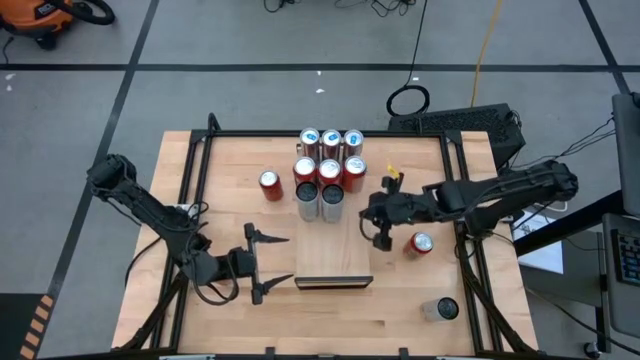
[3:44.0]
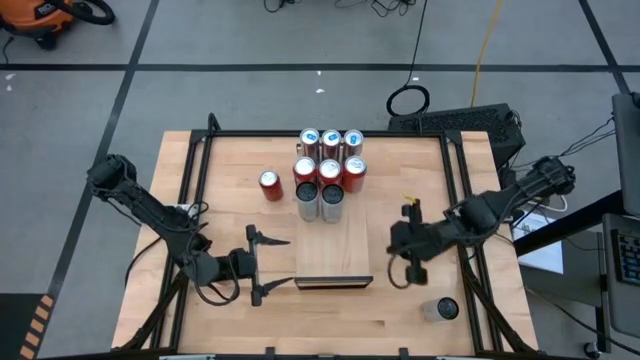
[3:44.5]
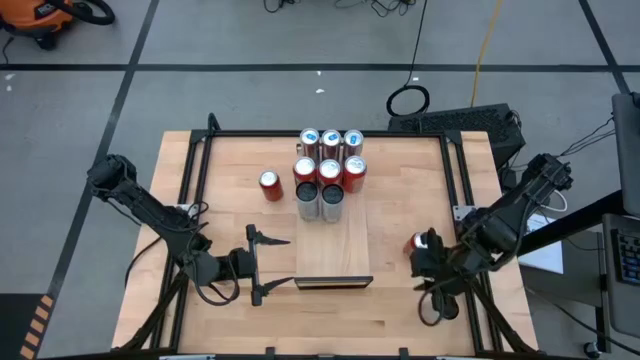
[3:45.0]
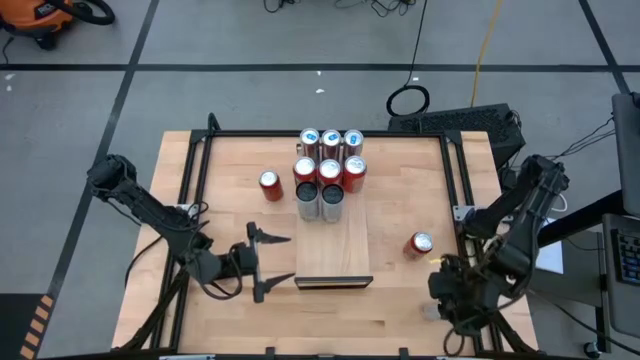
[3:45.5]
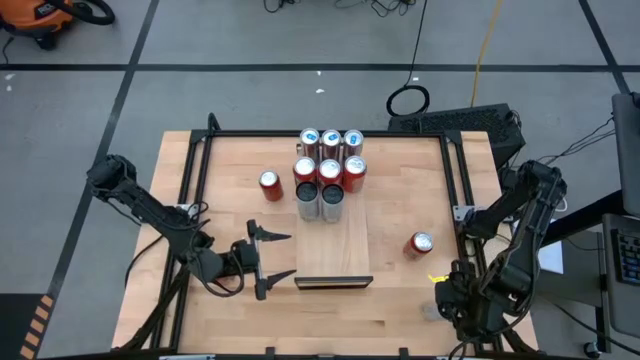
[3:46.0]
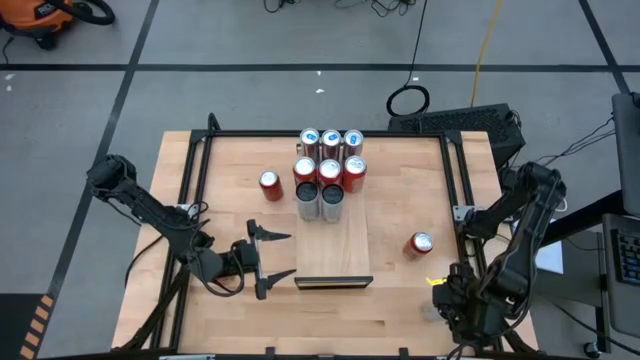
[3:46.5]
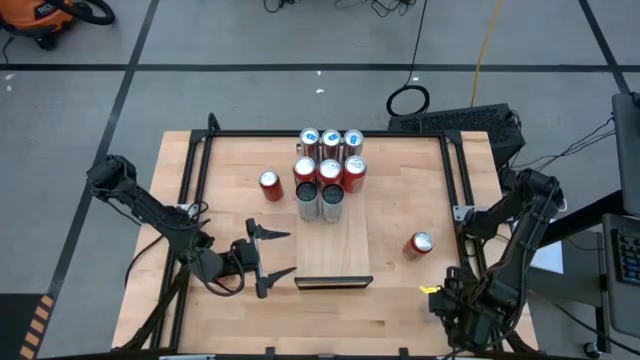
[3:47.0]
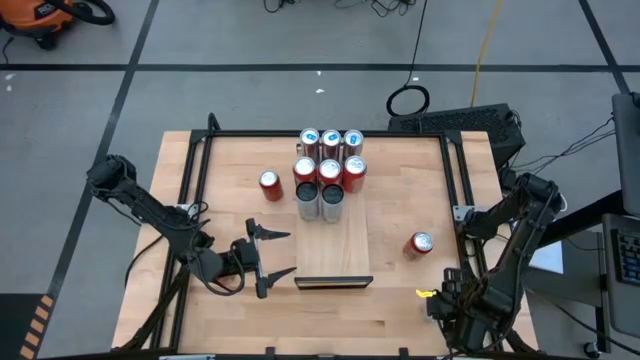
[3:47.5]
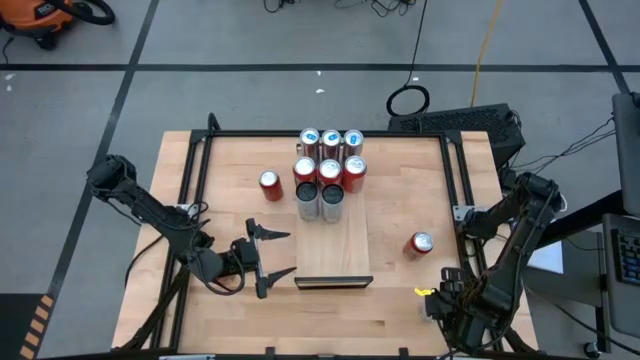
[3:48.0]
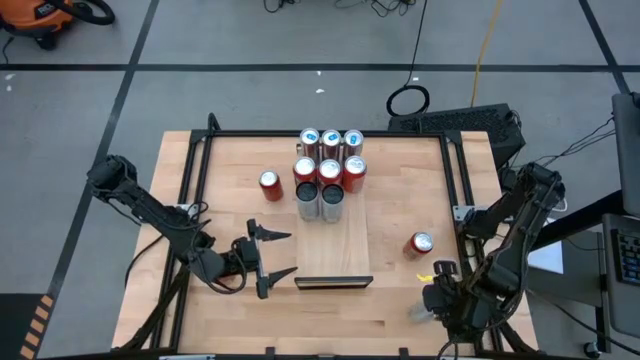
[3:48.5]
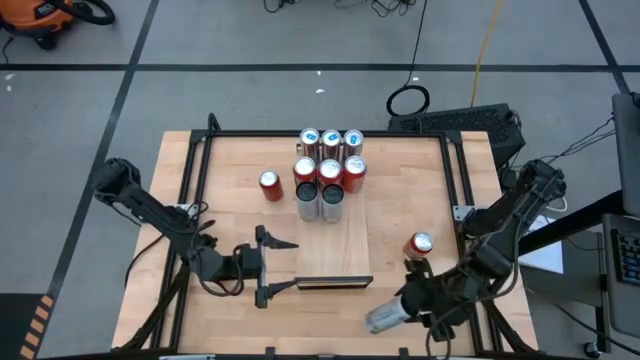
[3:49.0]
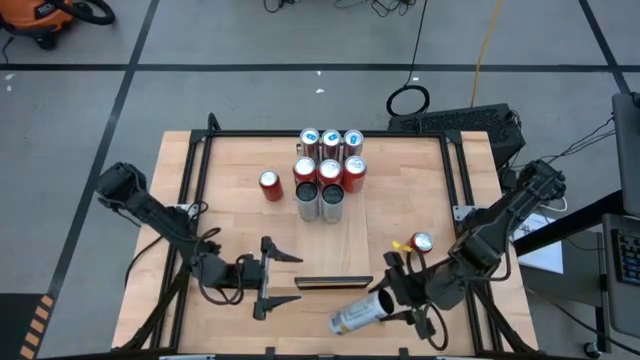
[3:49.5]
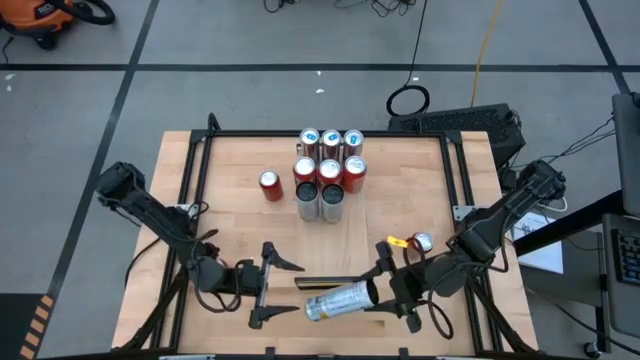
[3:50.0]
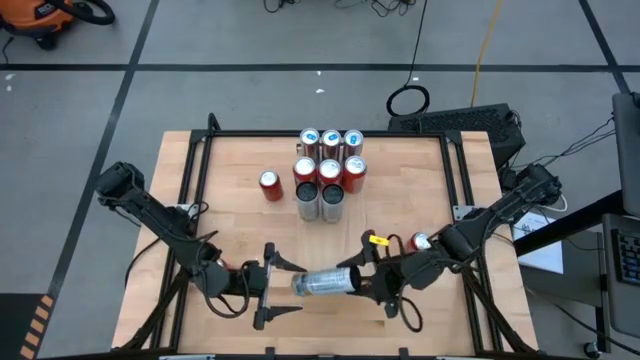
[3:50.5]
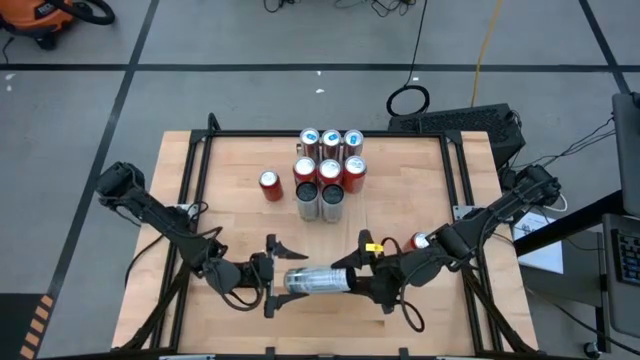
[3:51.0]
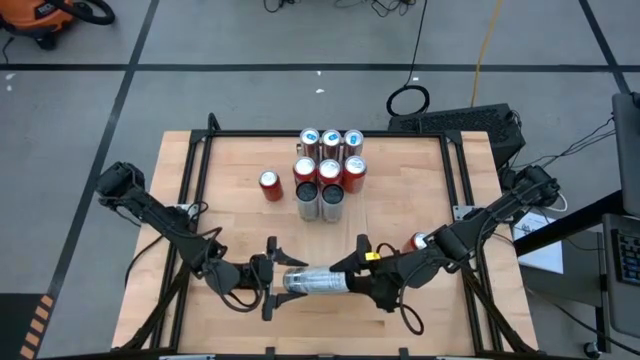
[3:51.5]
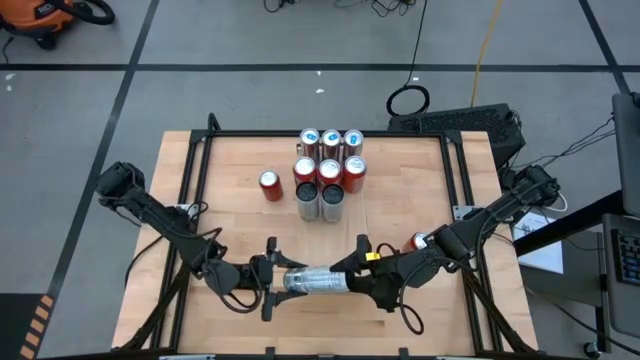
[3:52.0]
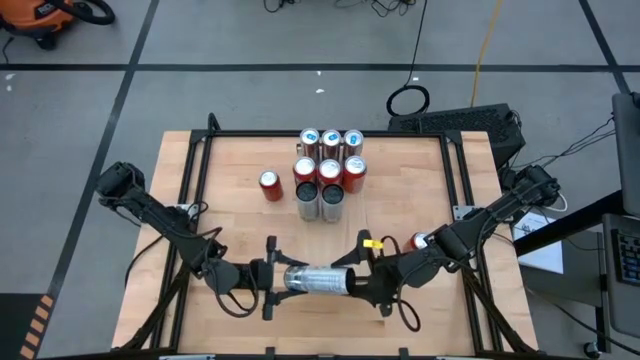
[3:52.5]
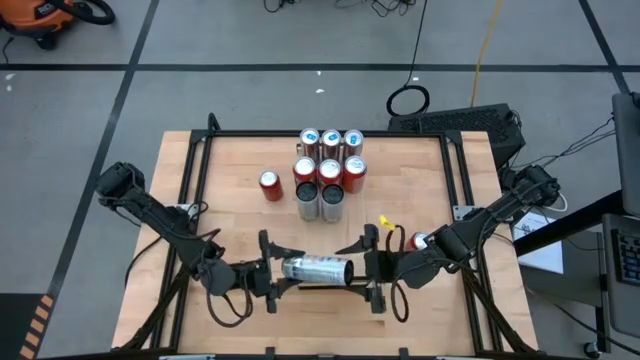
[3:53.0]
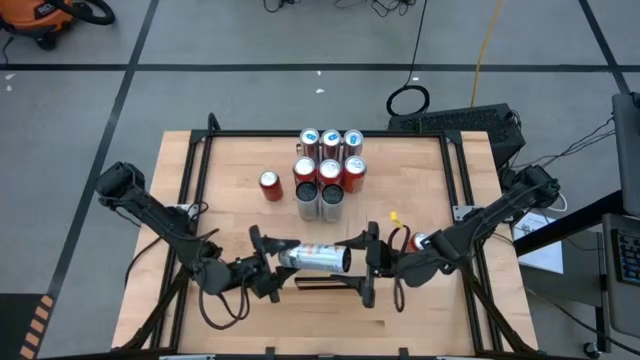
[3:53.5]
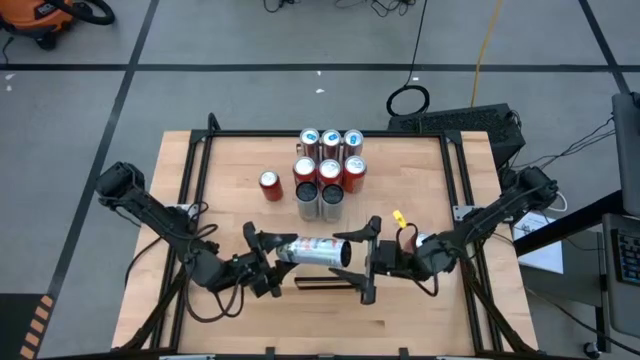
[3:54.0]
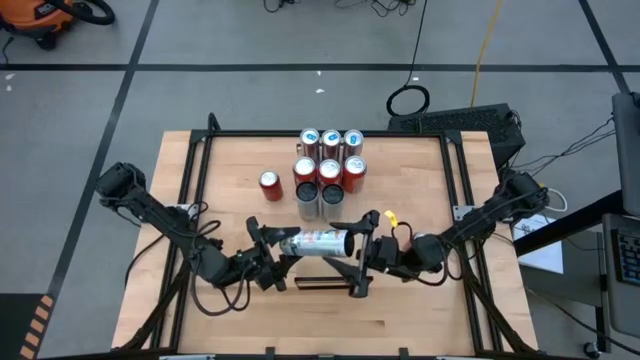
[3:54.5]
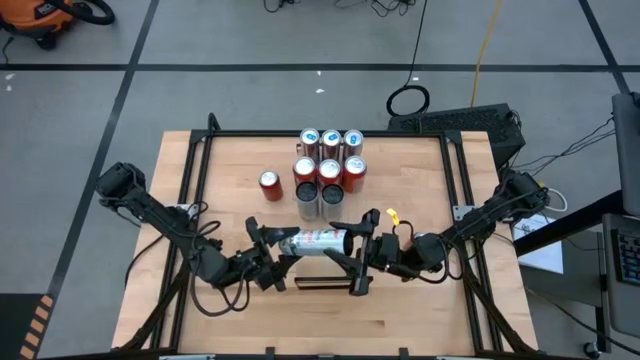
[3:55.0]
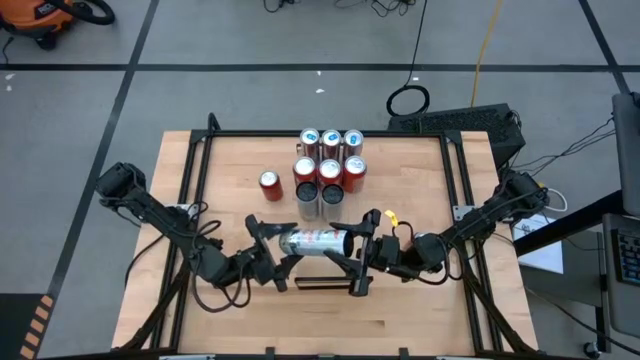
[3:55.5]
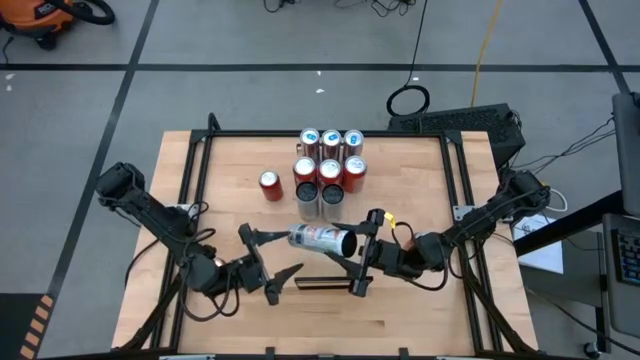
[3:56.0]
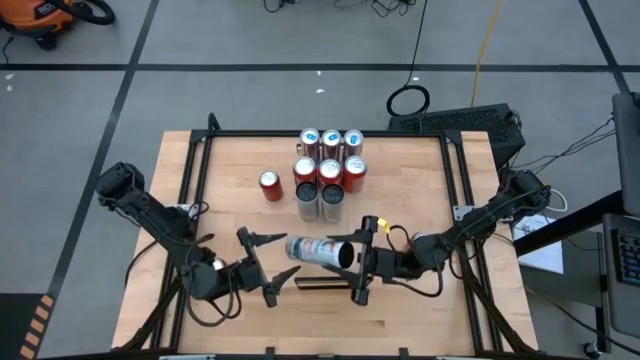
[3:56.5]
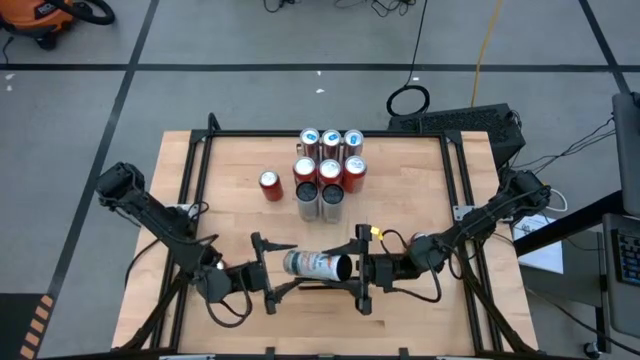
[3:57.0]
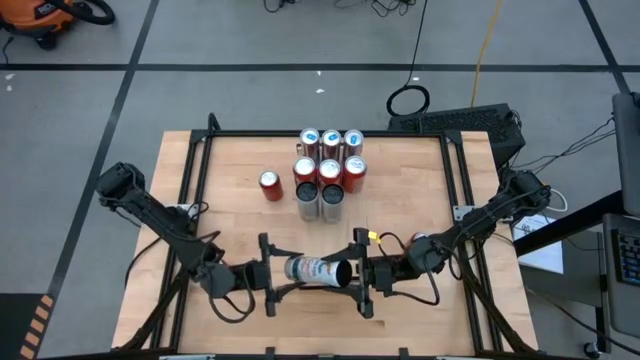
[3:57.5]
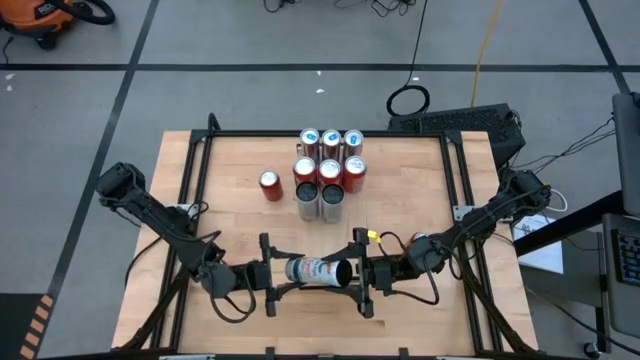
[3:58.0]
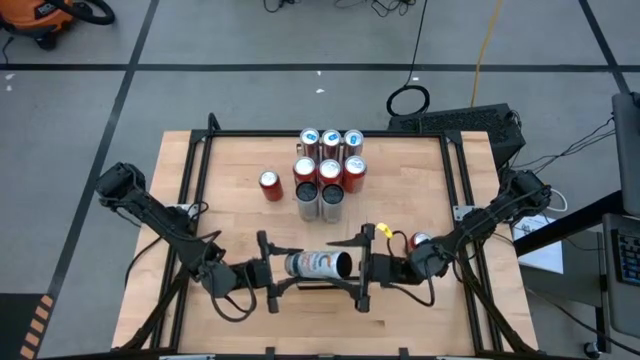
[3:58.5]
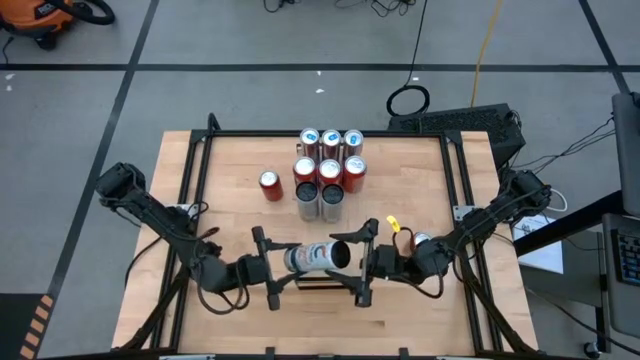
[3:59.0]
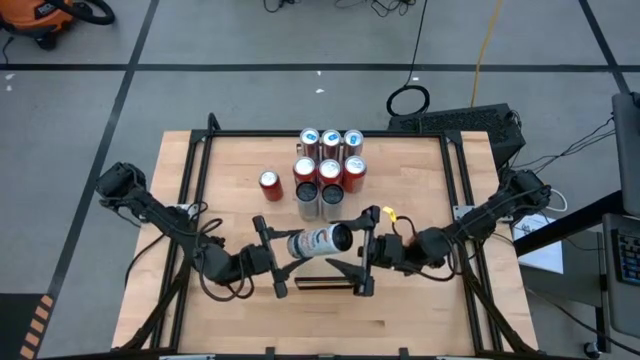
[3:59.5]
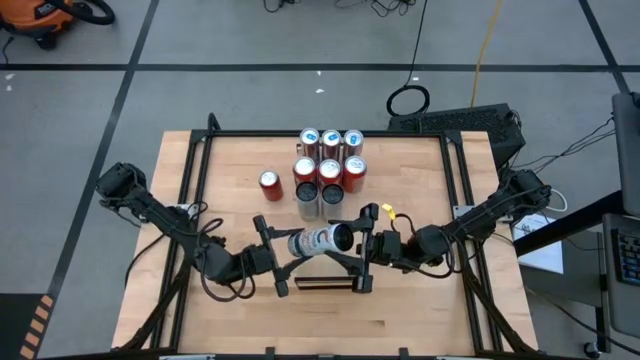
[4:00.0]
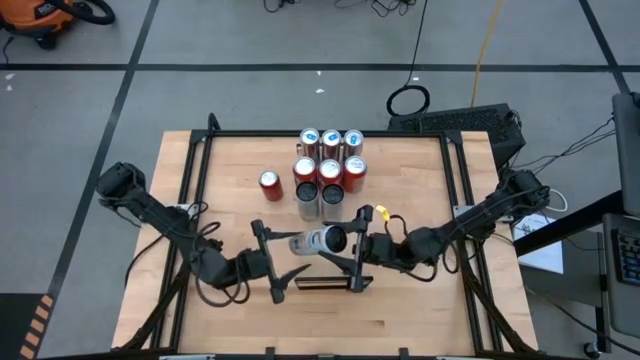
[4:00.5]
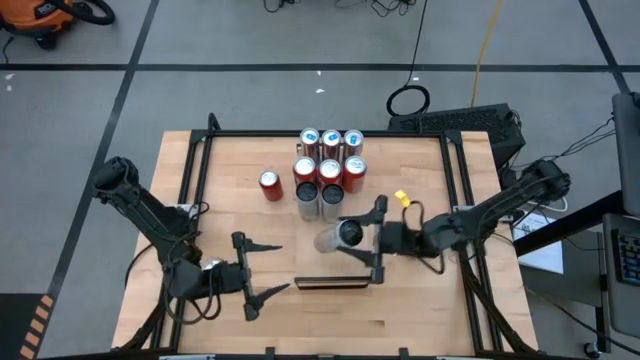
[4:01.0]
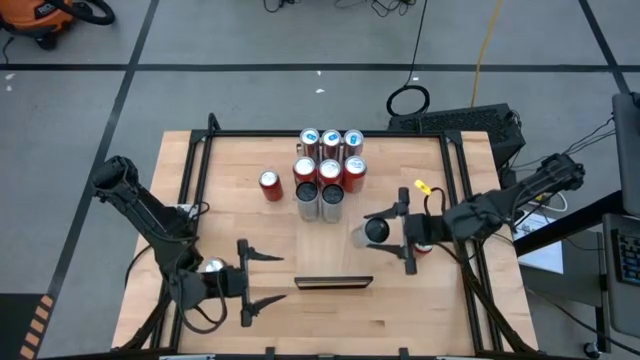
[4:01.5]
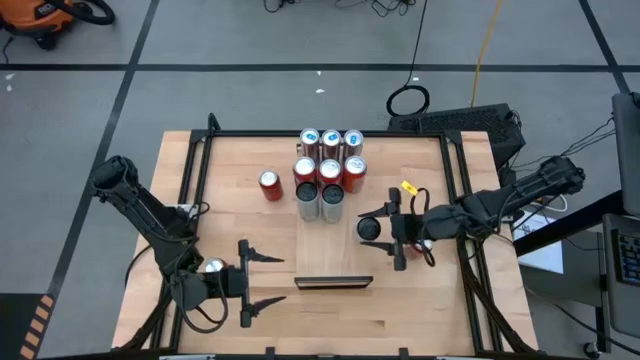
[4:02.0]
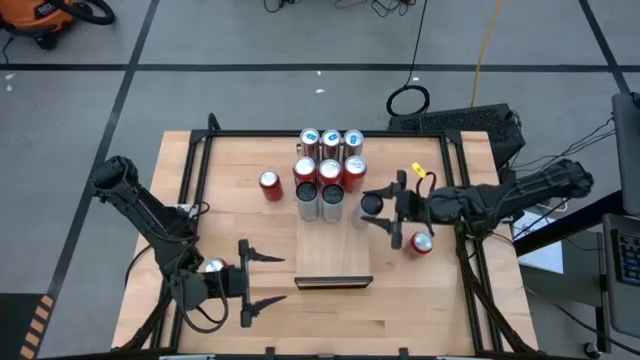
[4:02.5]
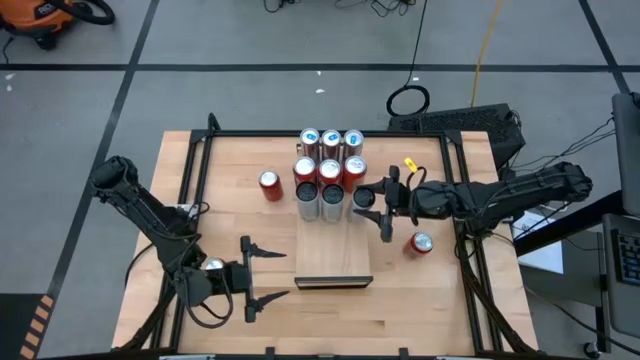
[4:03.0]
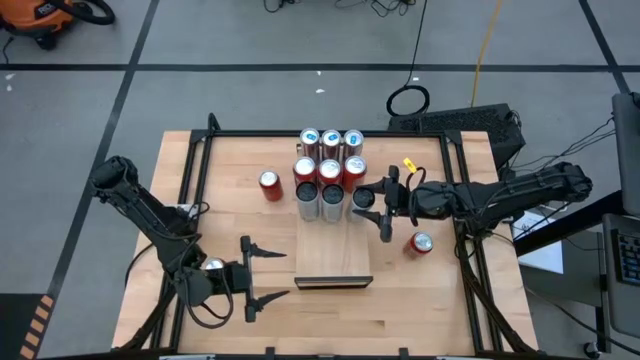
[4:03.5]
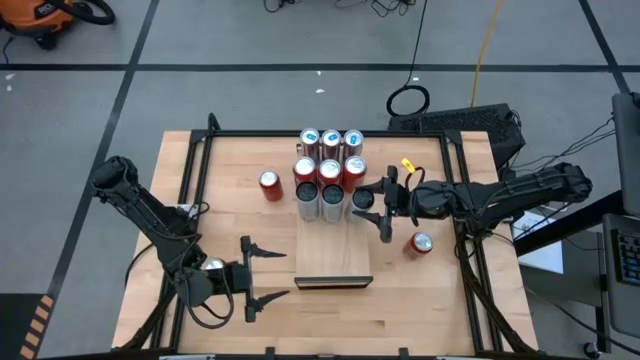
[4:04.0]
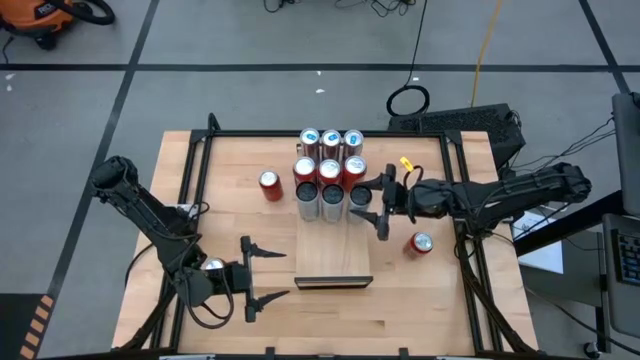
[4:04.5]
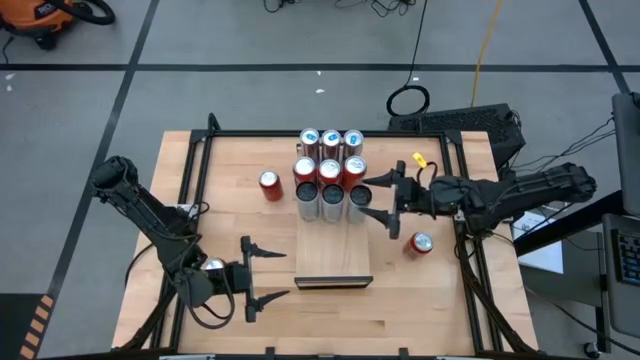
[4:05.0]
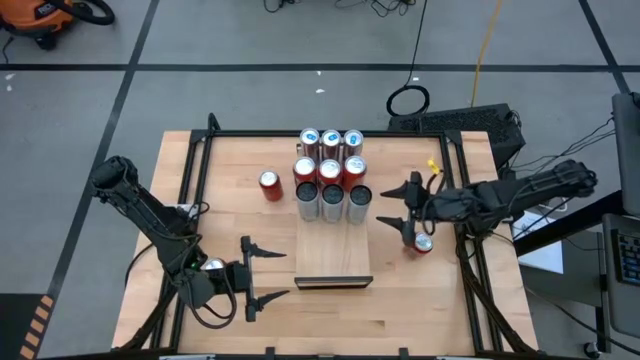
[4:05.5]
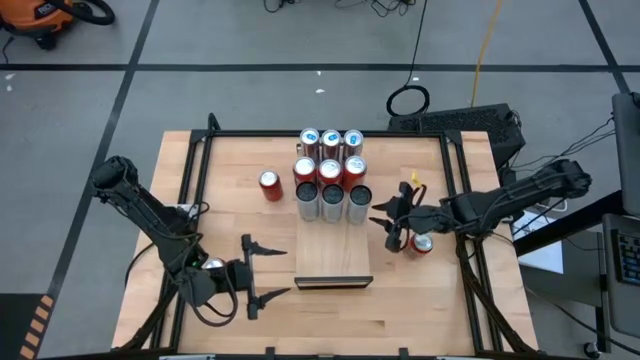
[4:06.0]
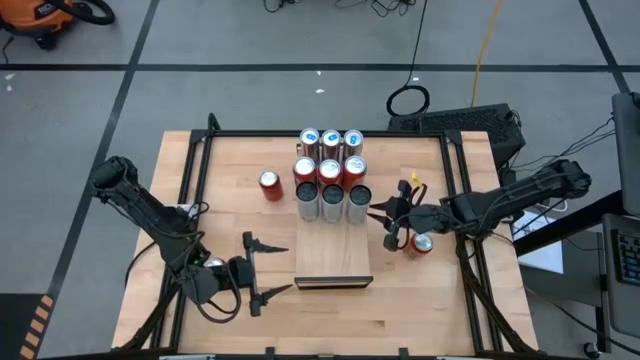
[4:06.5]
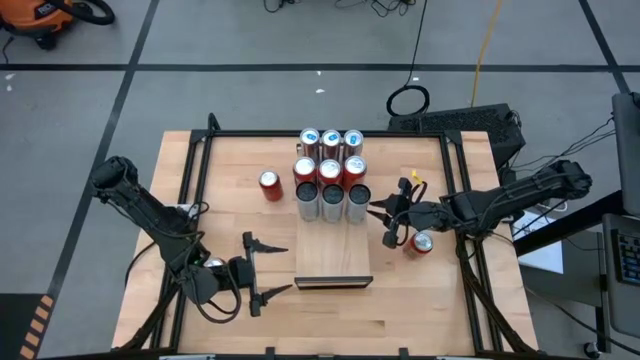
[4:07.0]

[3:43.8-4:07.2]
Task: Place canned beverage on shelf
Put the white yellow soda can on the shelf aligned with the other white yellow soda can
